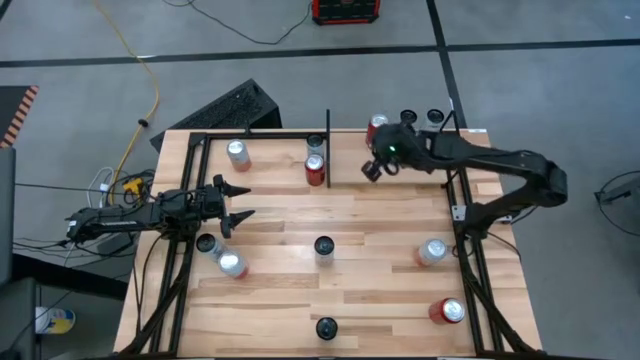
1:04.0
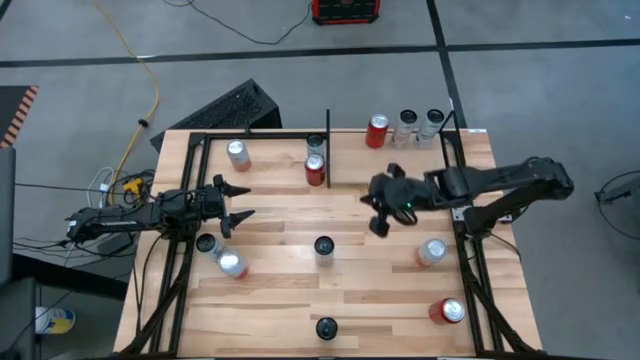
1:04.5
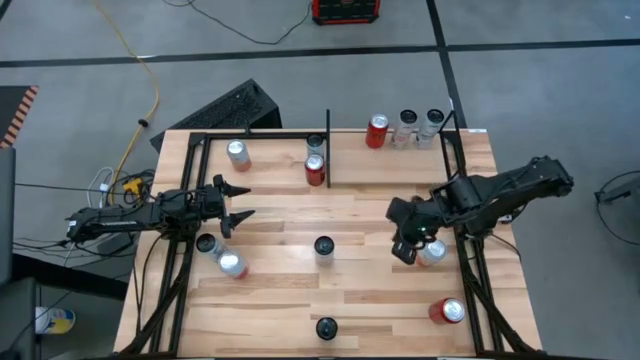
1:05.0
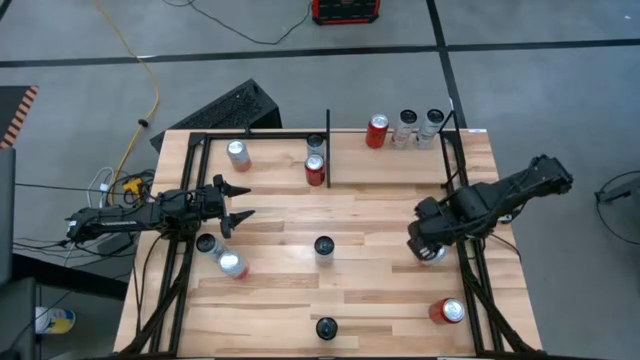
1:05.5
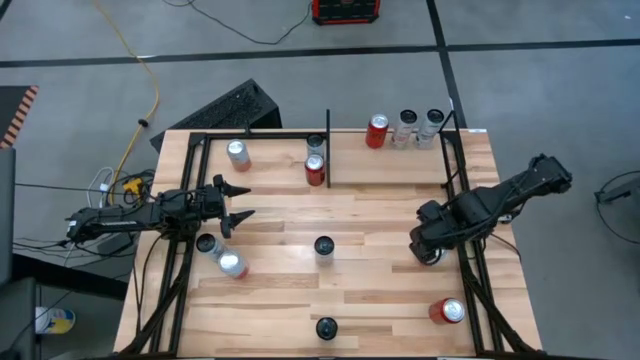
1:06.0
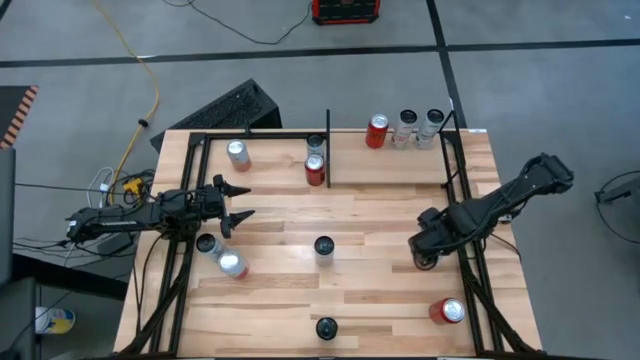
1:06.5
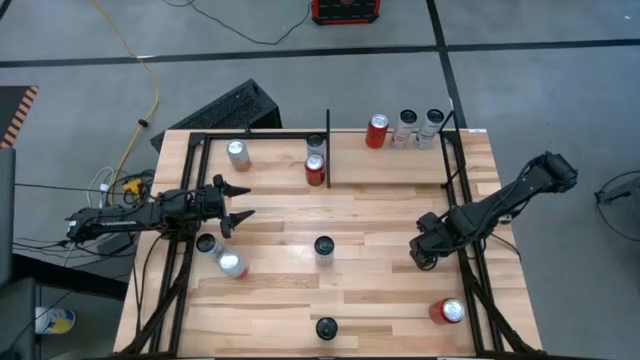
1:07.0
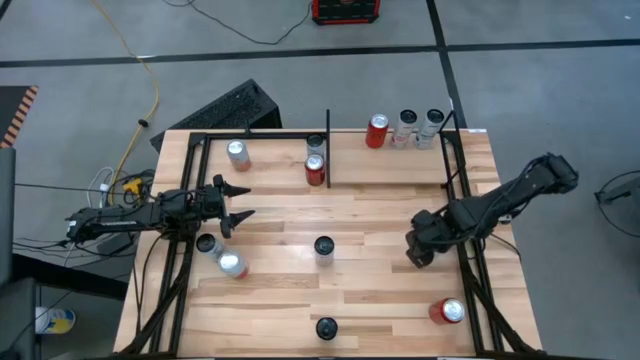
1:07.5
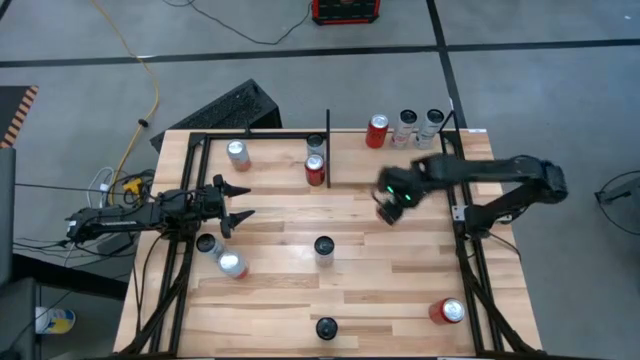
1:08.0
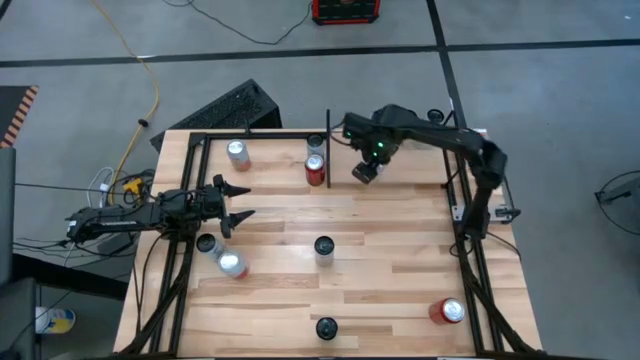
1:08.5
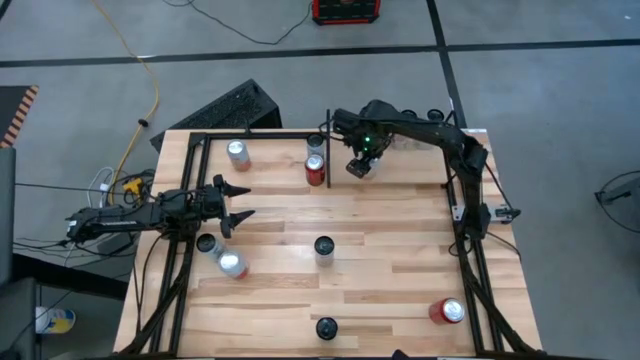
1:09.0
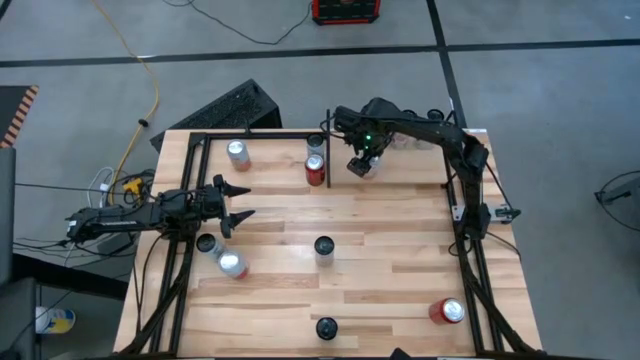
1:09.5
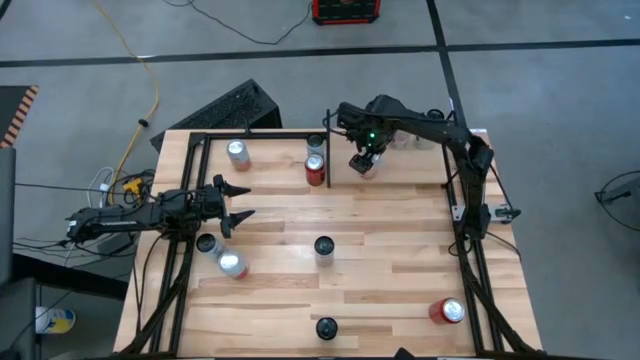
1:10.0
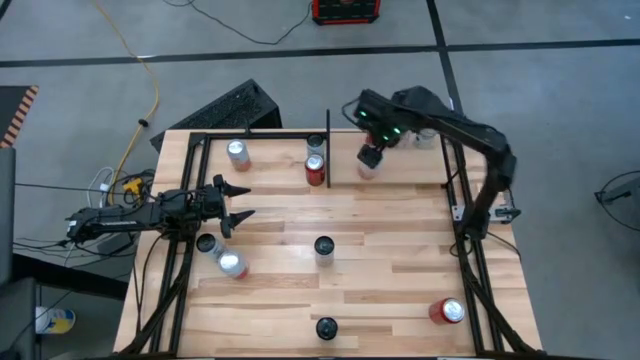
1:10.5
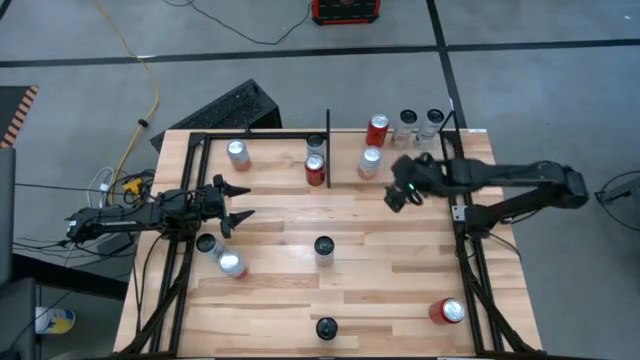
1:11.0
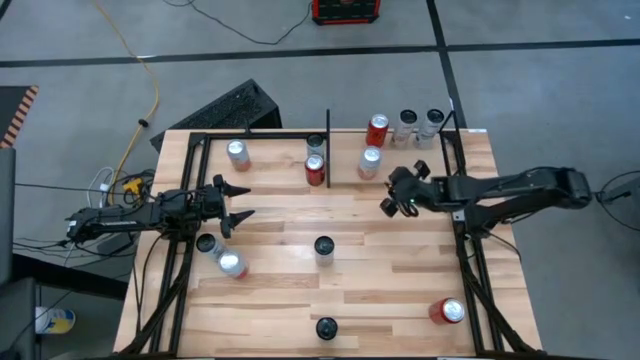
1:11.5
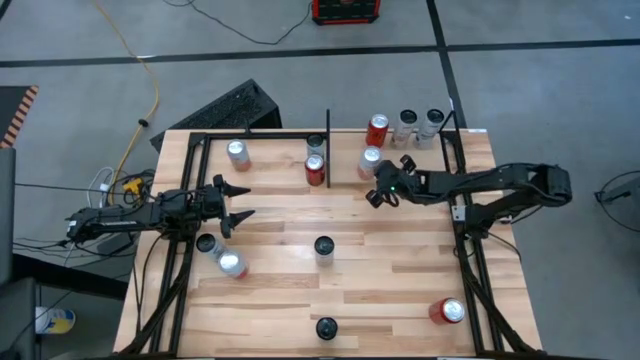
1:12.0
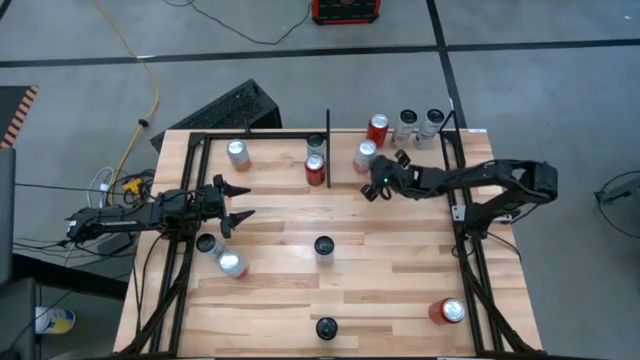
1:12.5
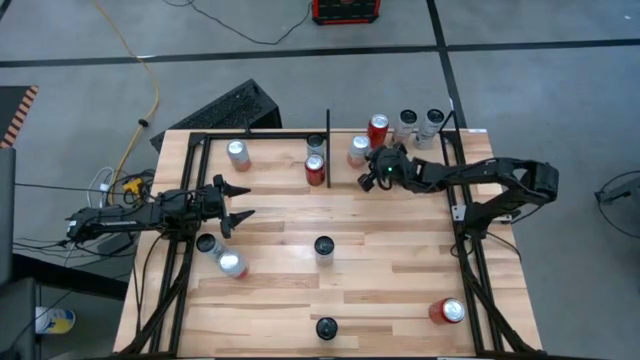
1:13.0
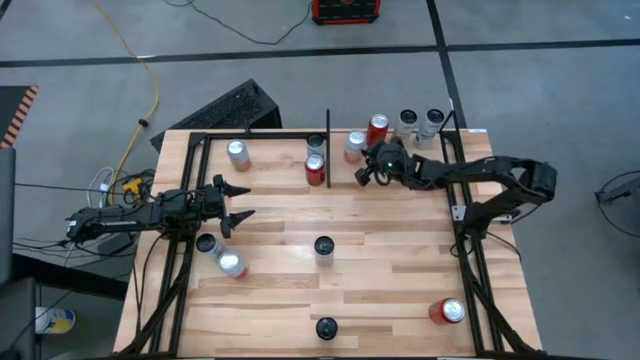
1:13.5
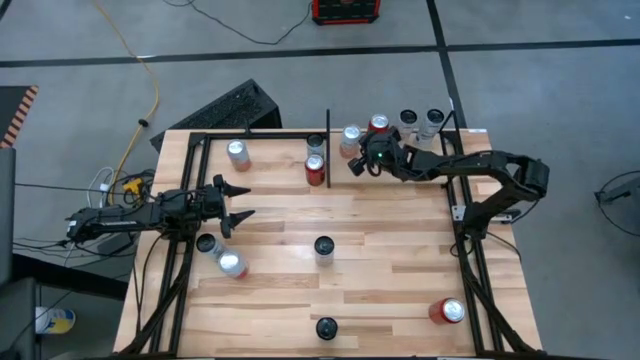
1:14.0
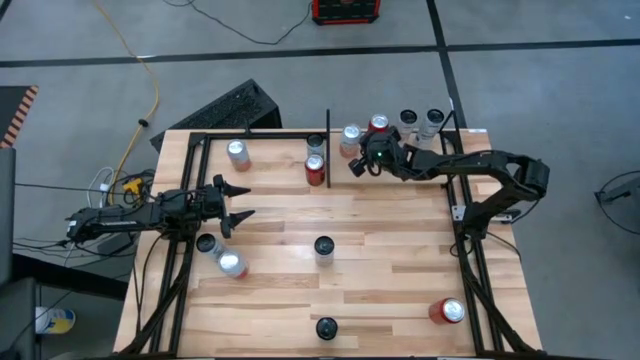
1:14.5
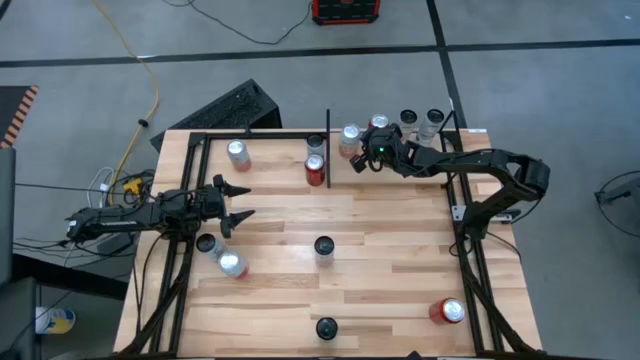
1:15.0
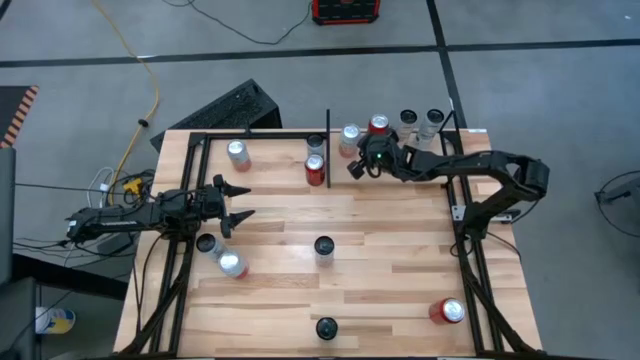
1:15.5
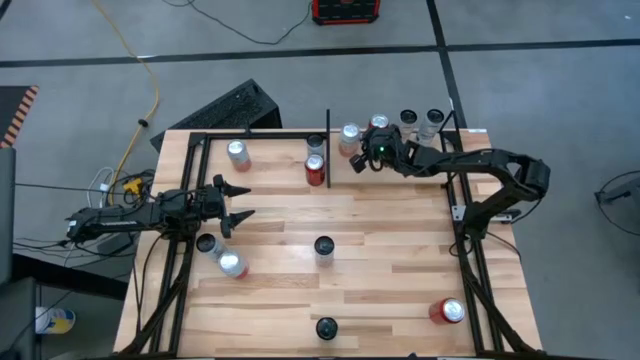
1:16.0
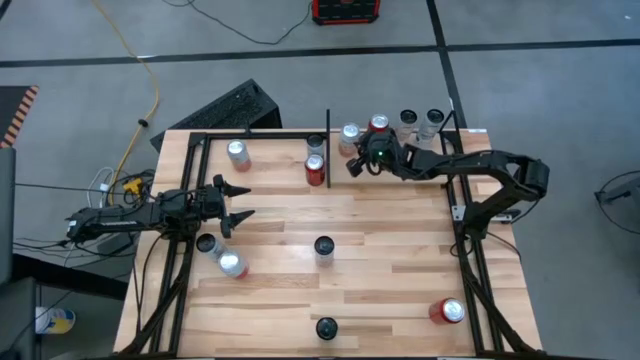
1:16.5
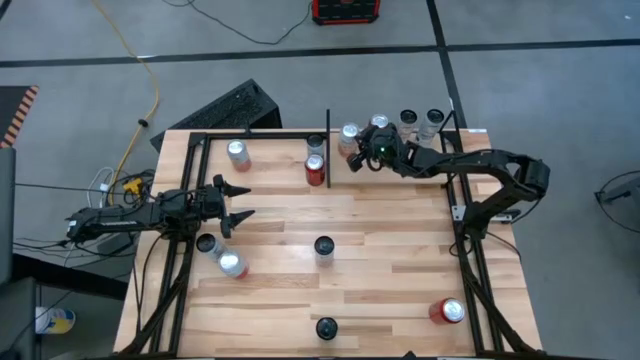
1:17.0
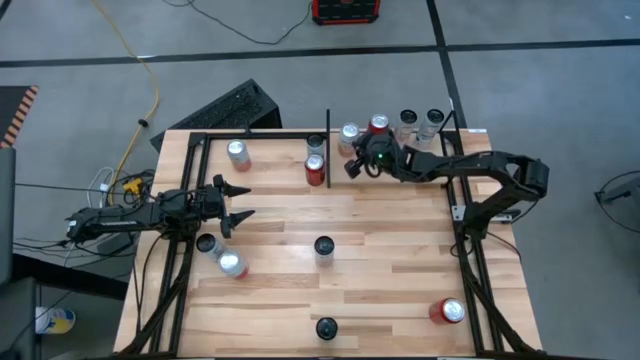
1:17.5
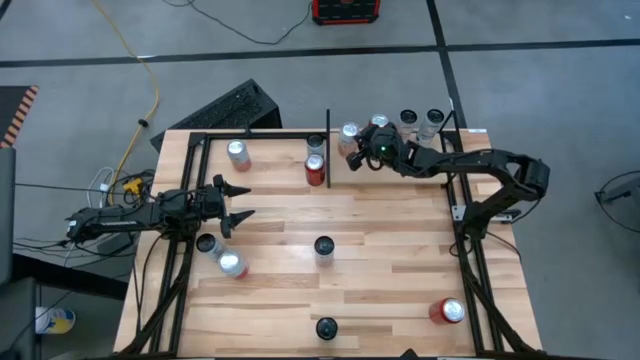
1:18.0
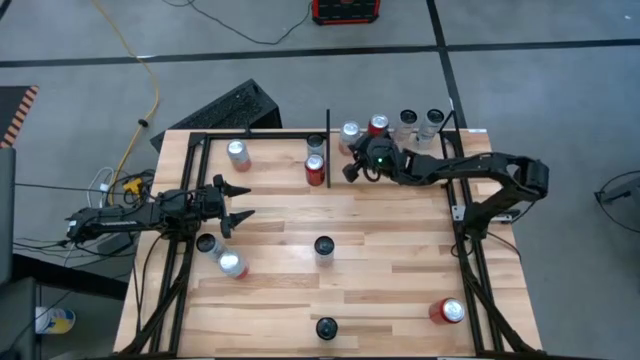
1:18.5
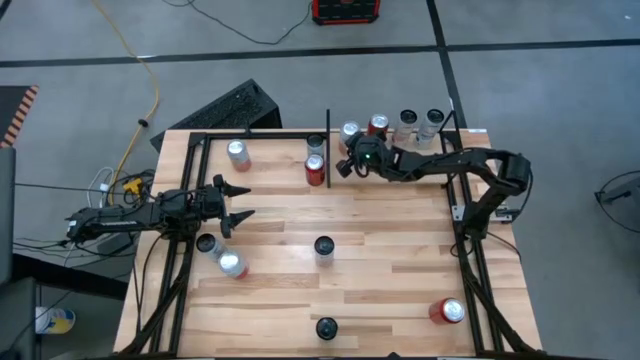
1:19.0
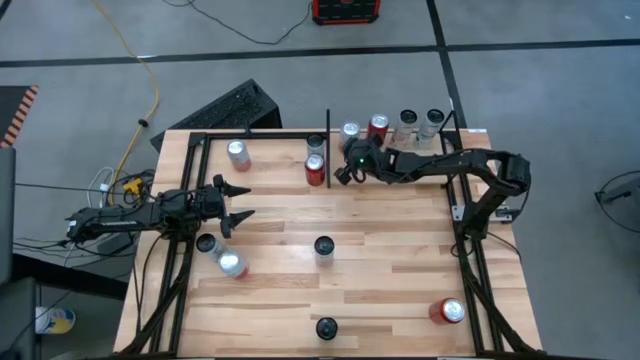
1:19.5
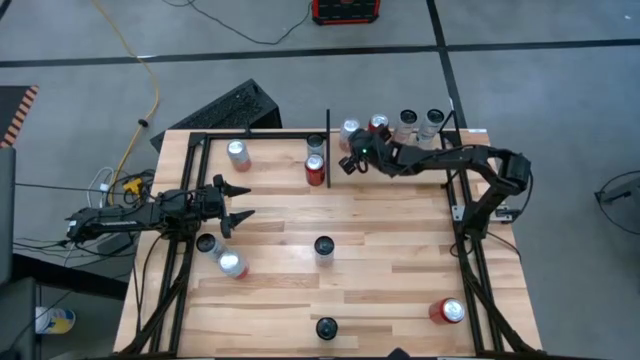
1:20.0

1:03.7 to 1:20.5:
Task: Place canned beverage on shelf
Put the white soda can on the shelf

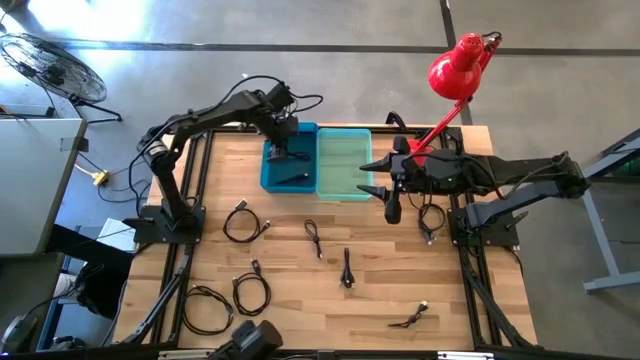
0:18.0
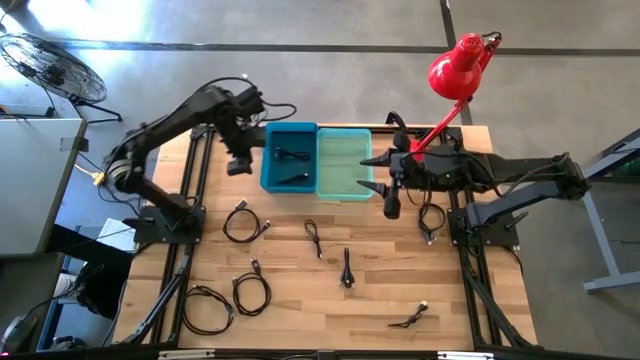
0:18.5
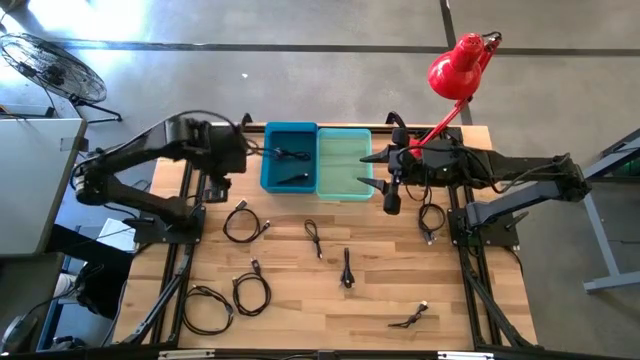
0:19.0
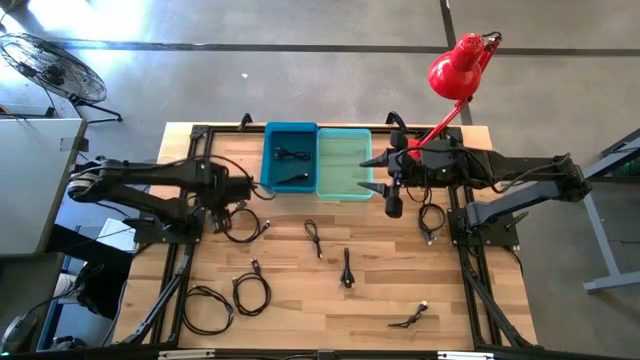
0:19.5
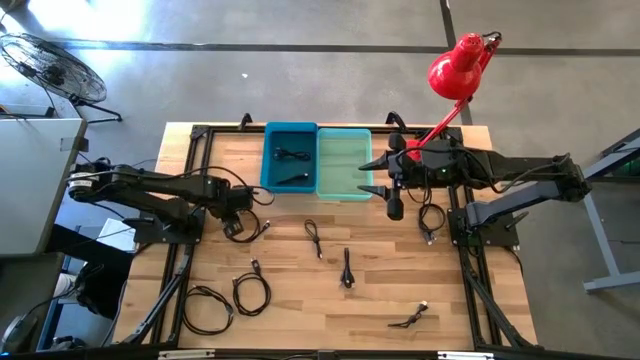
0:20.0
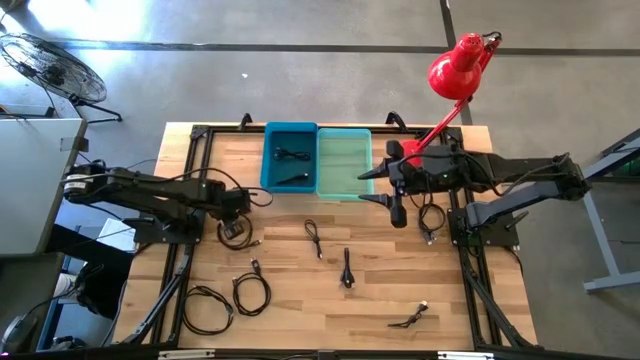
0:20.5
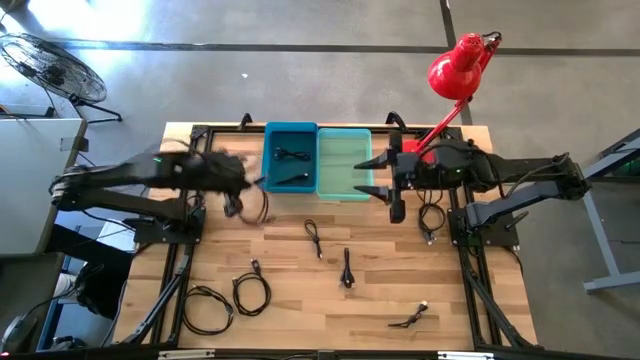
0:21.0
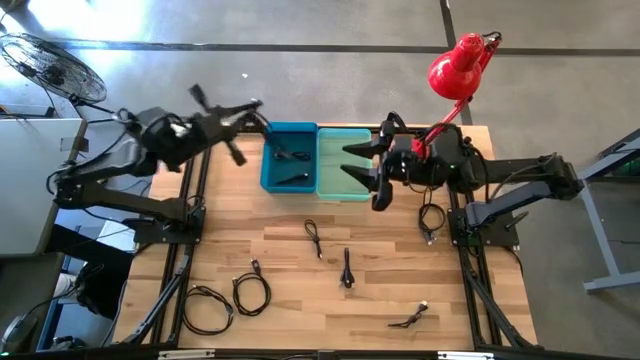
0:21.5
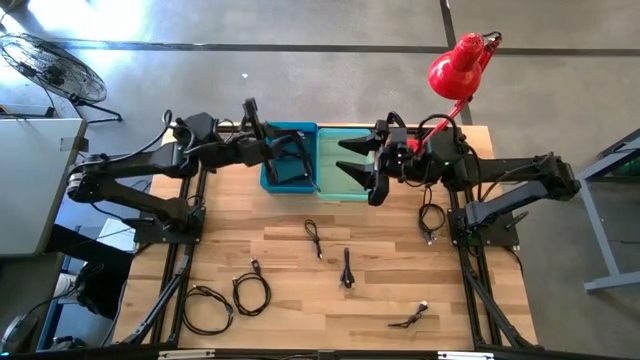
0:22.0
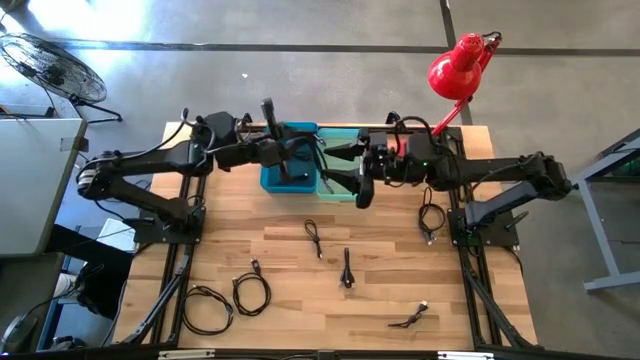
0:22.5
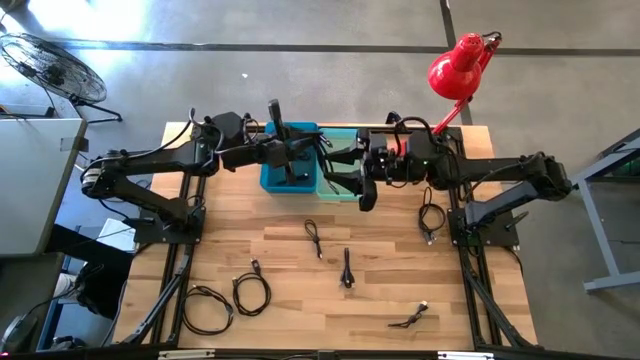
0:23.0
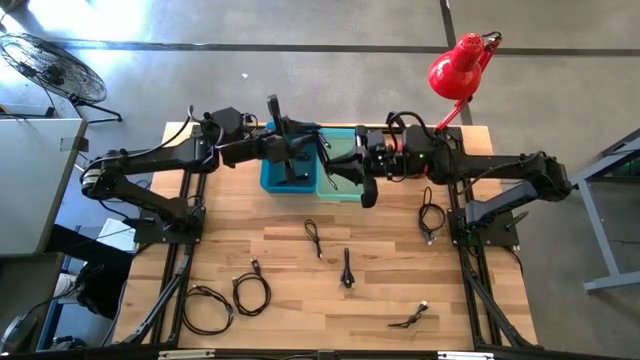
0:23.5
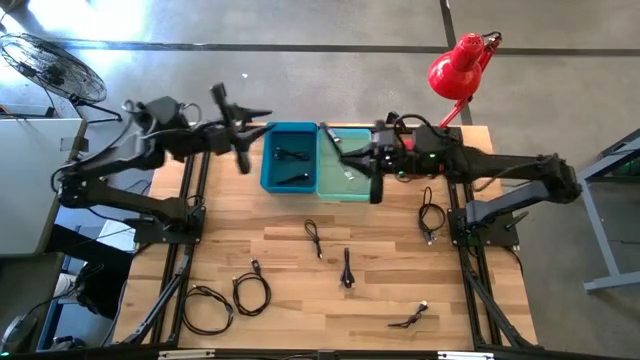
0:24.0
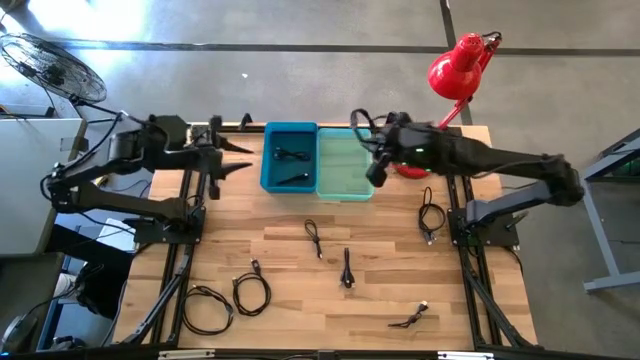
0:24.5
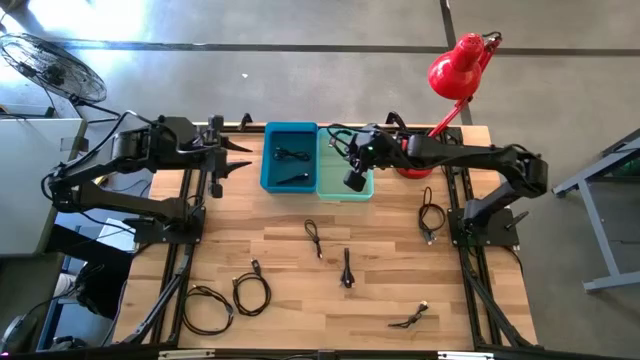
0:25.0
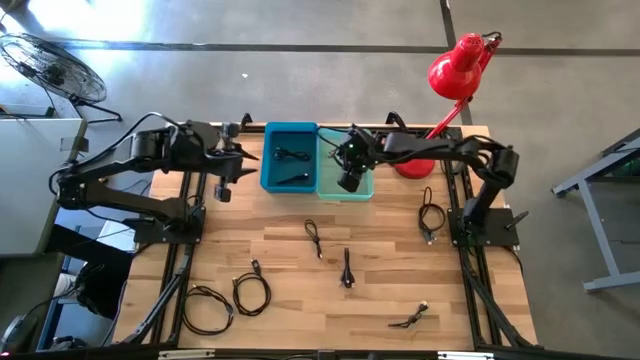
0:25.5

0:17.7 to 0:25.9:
Task: Pick & Place USB Port
Put the black USB cable into the green bin
